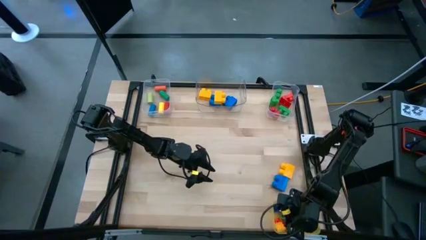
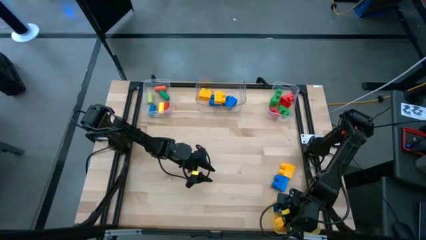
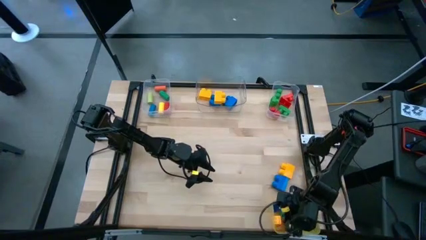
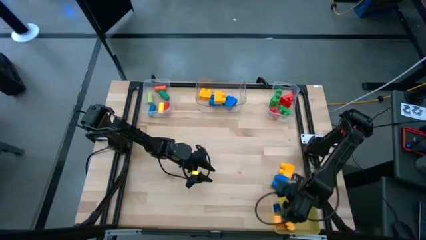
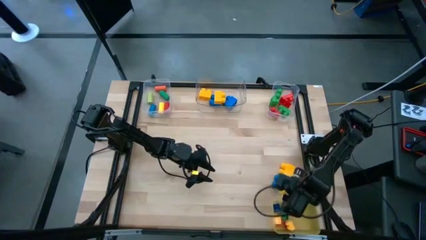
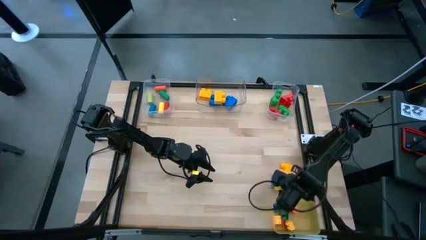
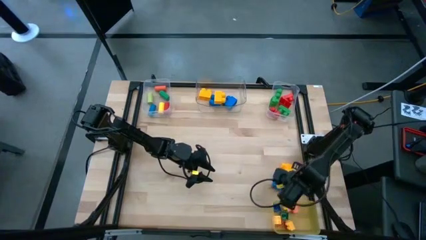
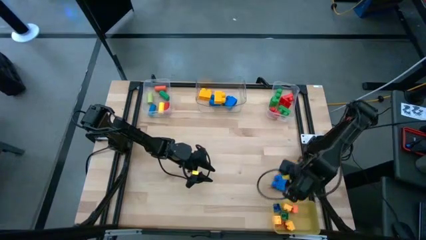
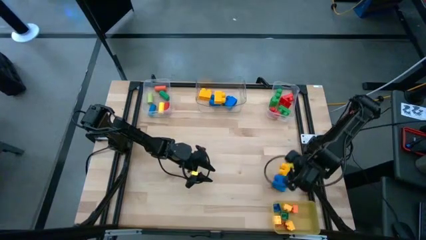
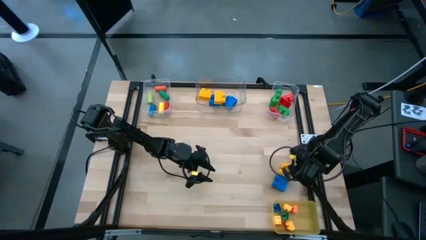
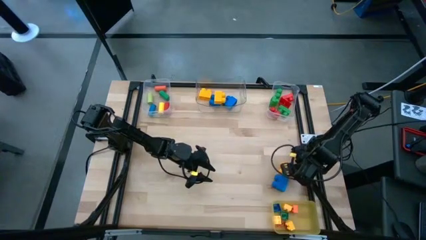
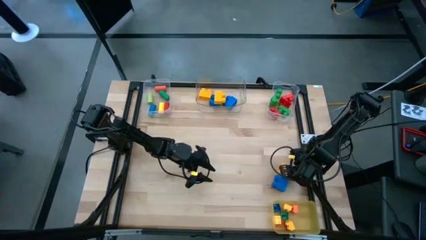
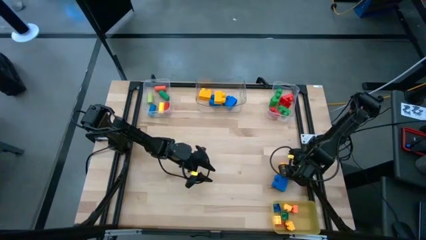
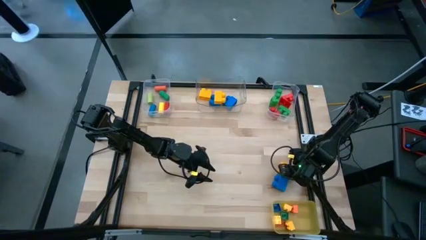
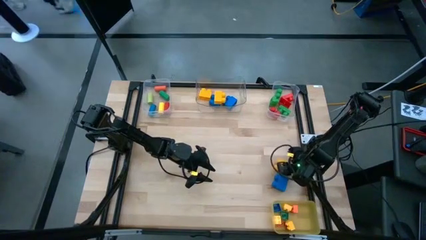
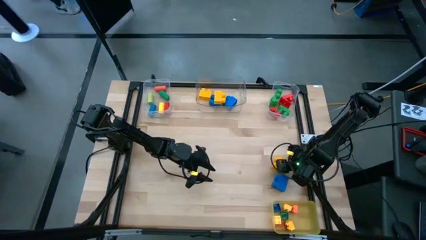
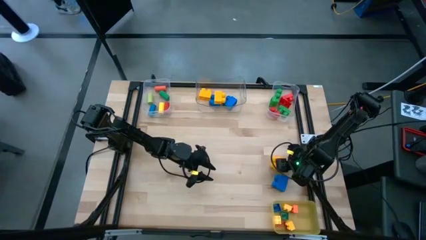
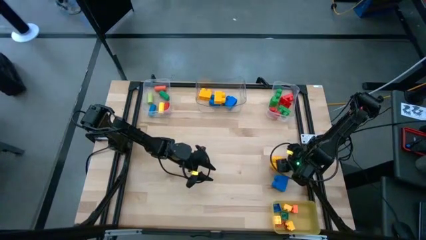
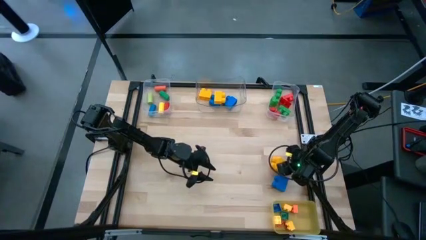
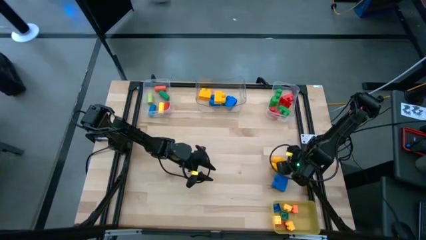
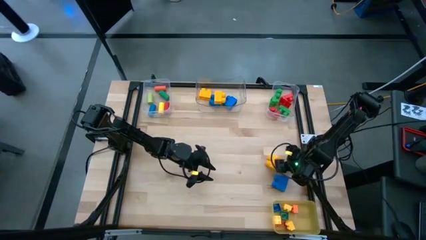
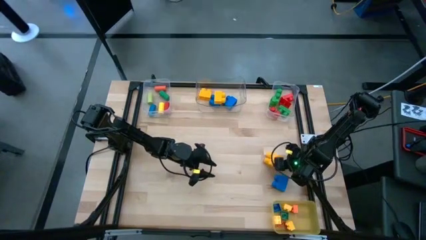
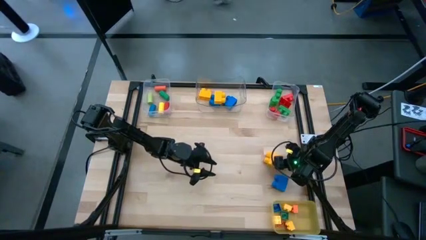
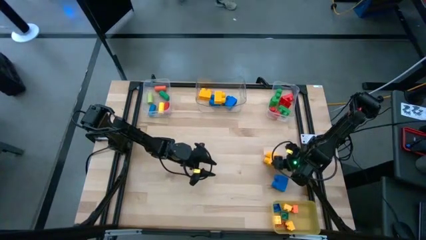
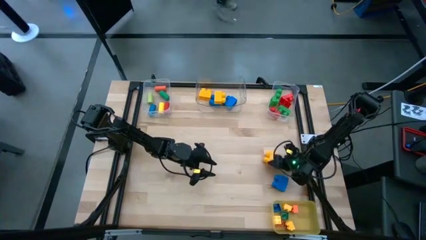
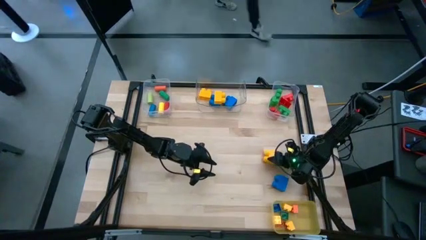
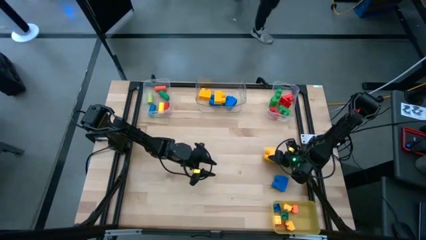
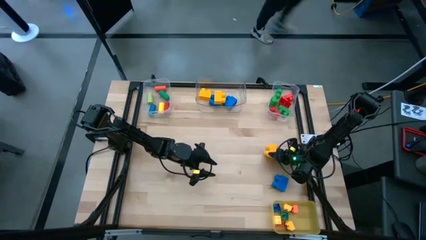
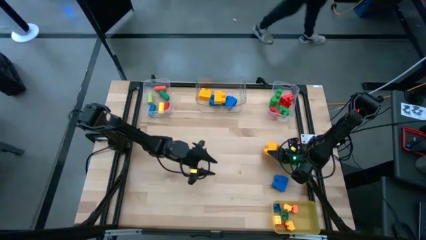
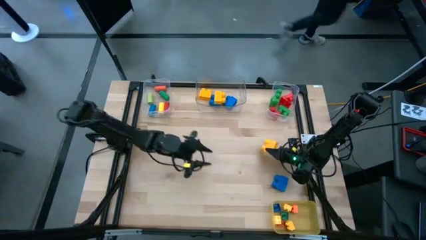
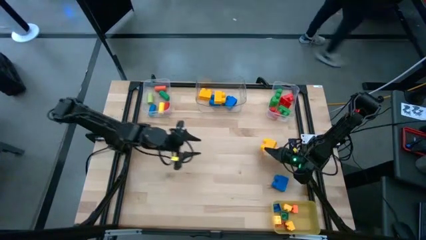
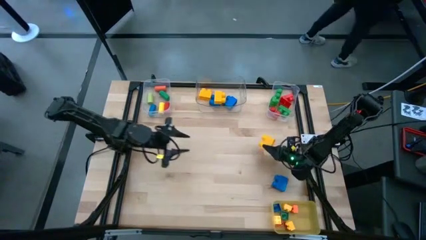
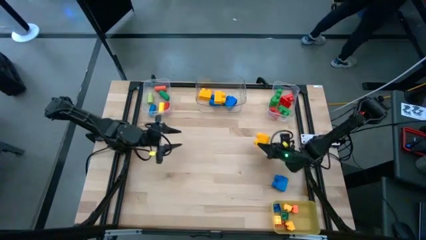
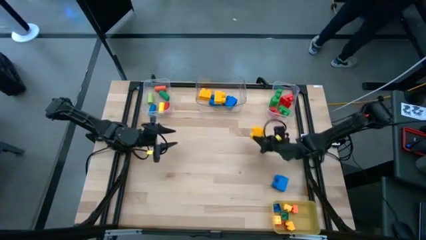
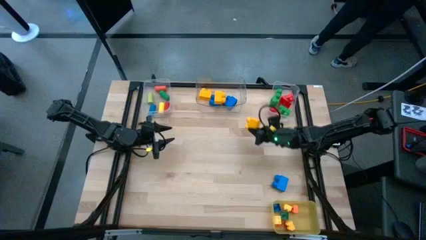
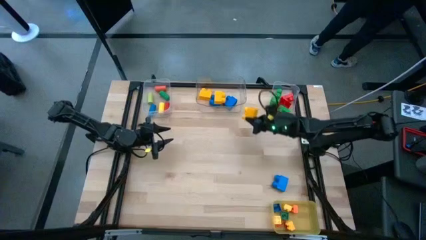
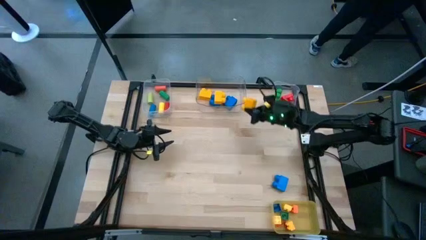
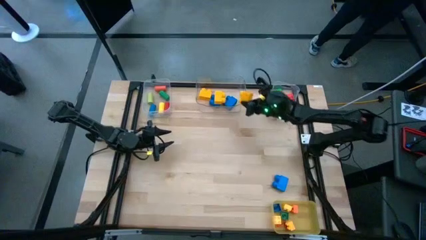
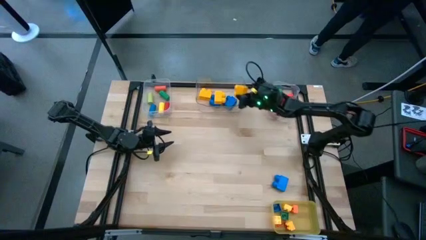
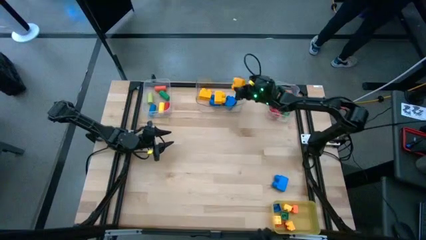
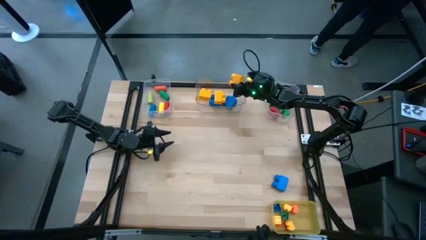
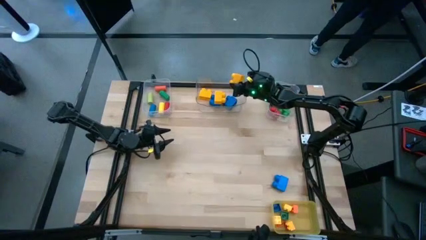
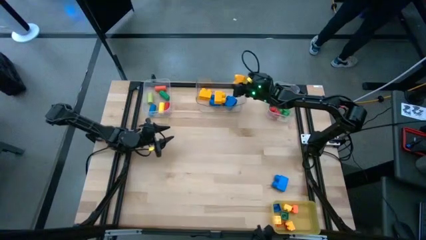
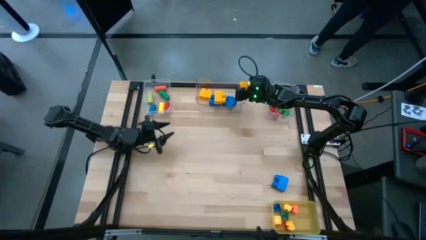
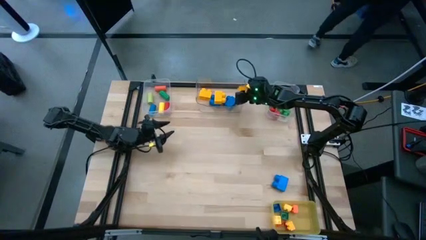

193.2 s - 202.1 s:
Task: Sort blocks by size
Put the large yellow game piece in the middle transparent bin

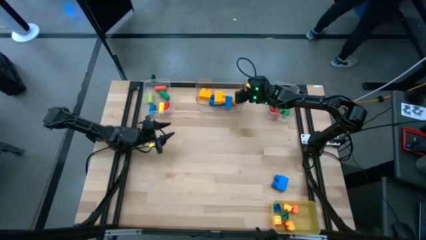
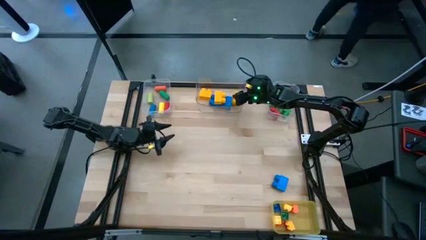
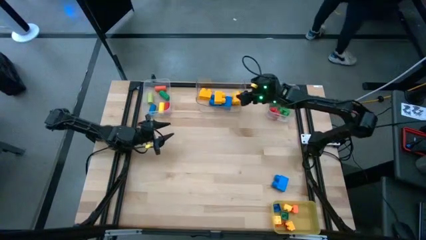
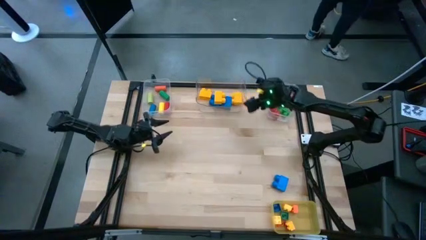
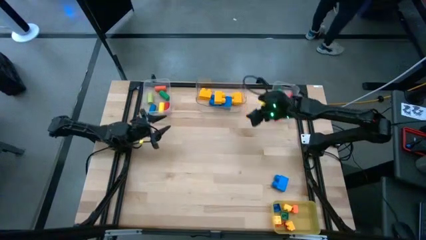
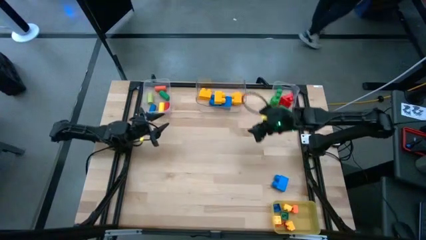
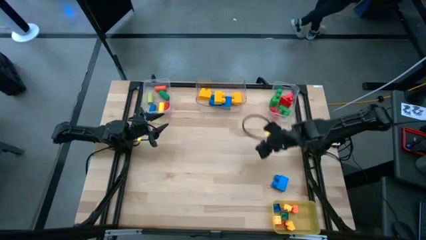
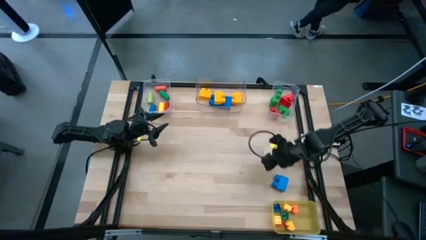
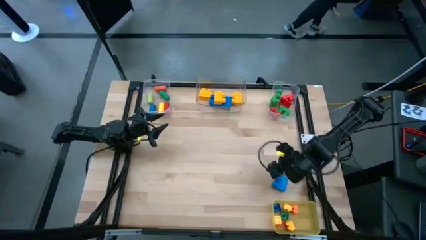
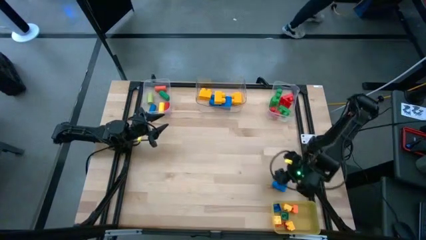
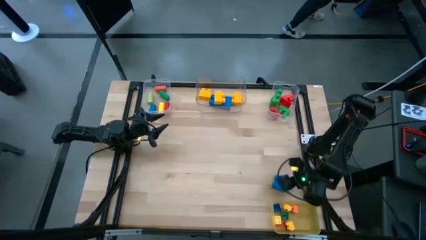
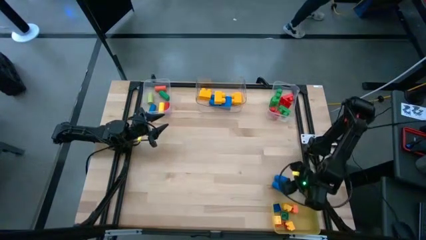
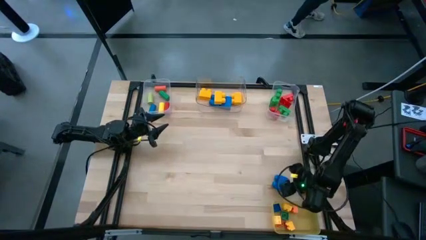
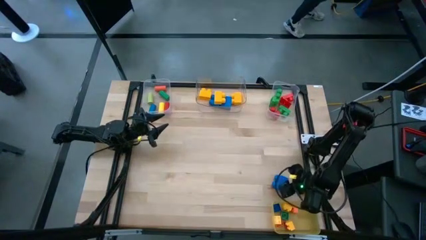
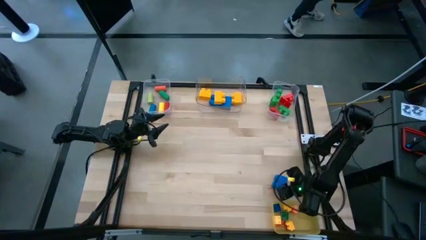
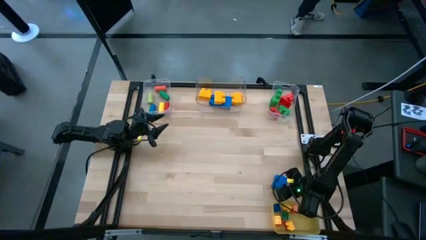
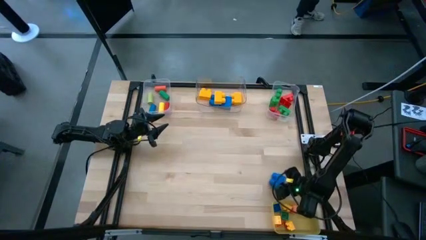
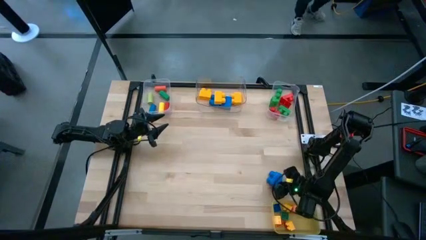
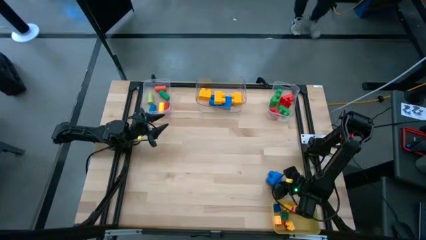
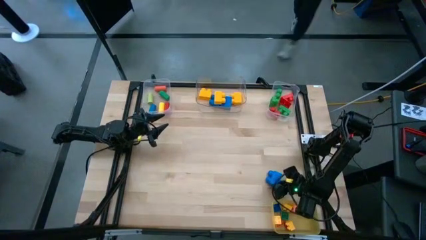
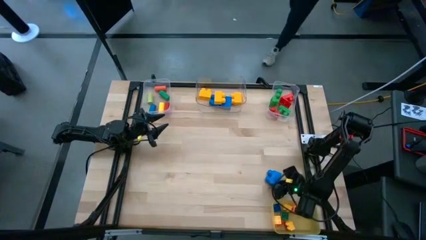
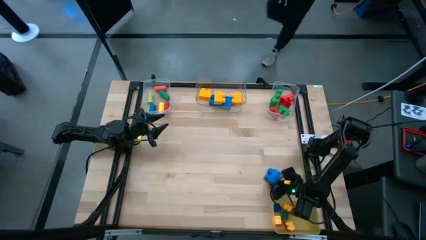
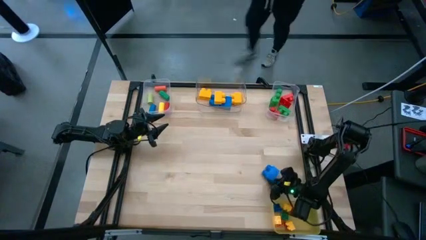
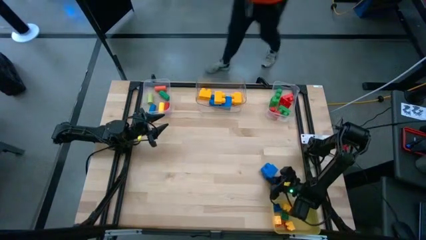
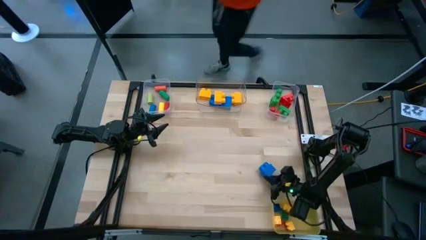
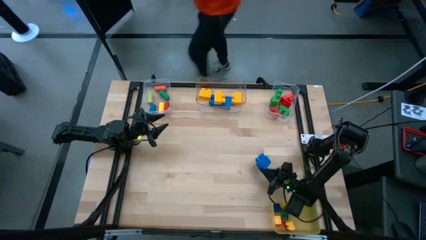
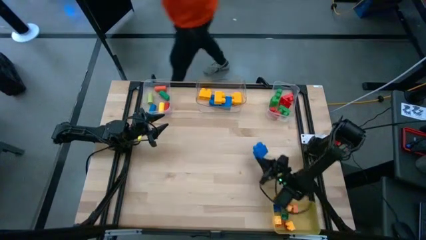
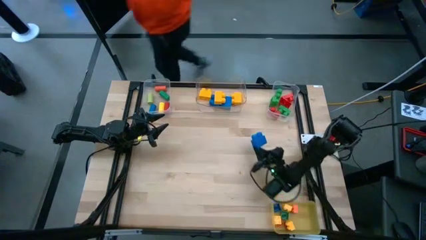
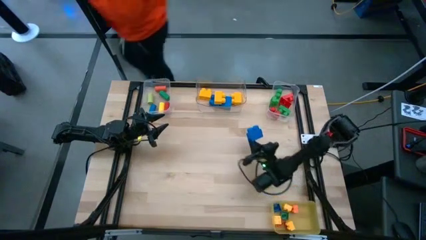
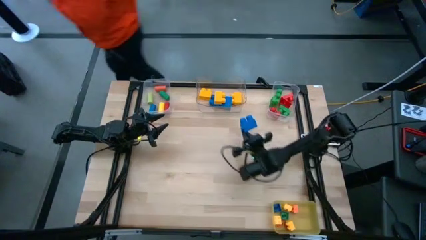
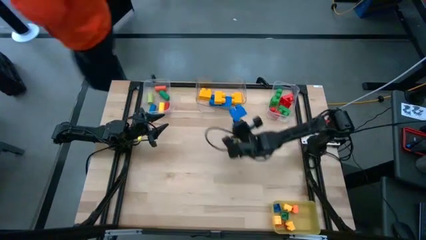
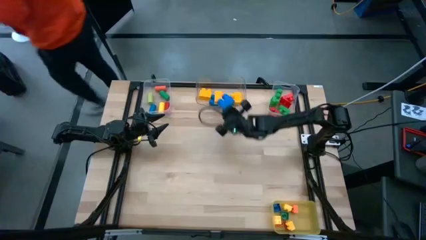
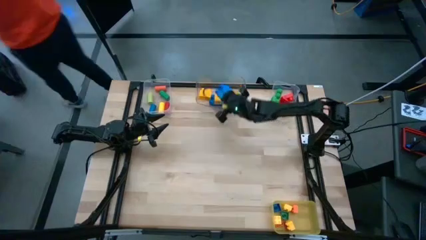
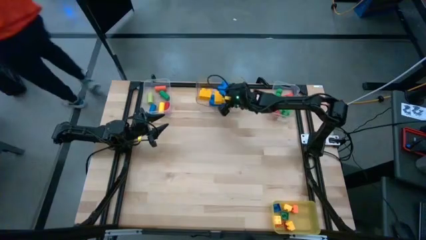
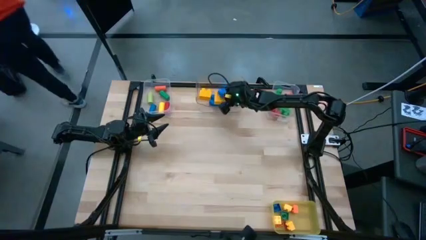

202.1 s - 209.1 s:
Put the large blue game piece in the middle transparent bin
